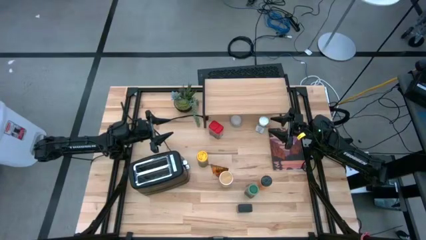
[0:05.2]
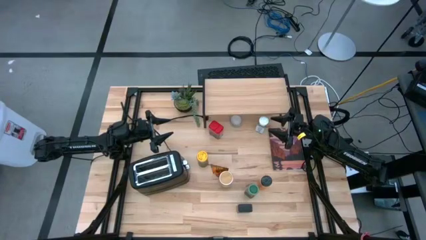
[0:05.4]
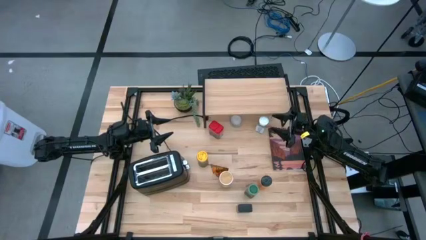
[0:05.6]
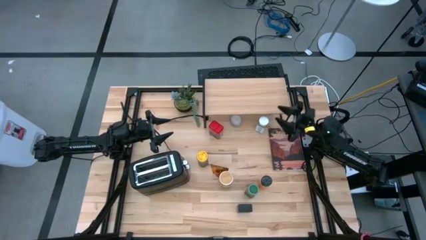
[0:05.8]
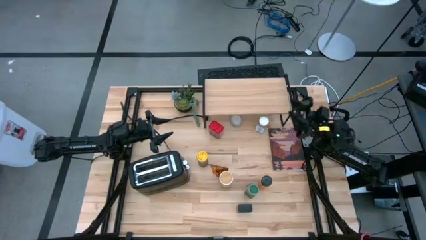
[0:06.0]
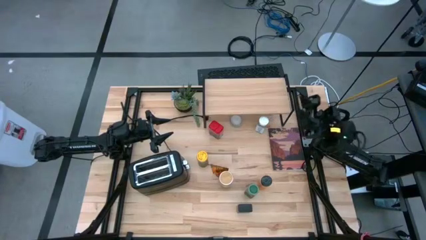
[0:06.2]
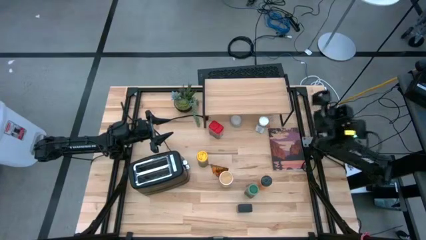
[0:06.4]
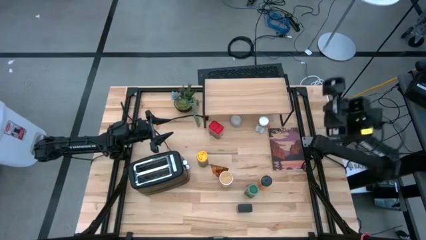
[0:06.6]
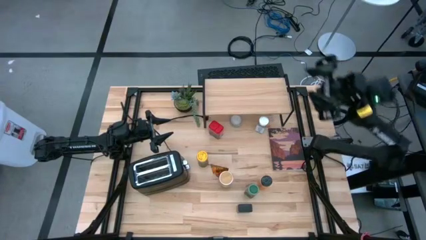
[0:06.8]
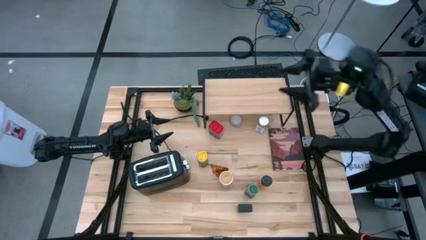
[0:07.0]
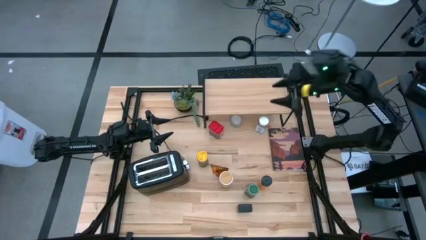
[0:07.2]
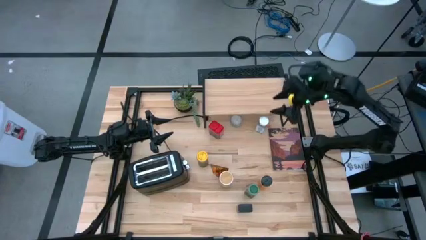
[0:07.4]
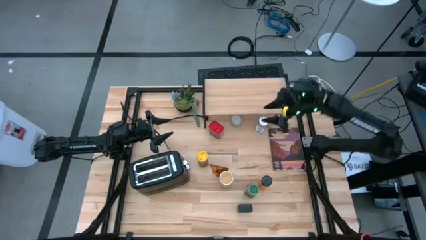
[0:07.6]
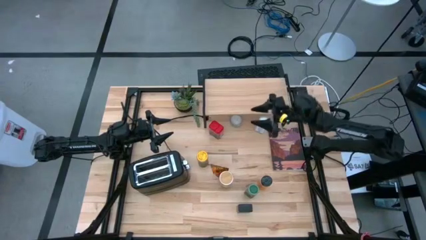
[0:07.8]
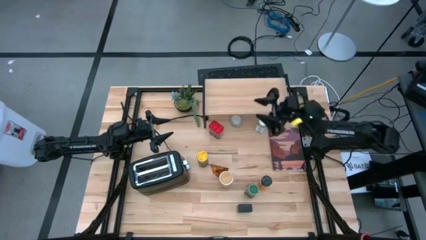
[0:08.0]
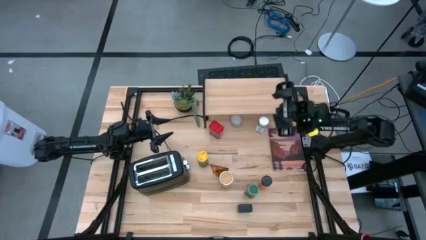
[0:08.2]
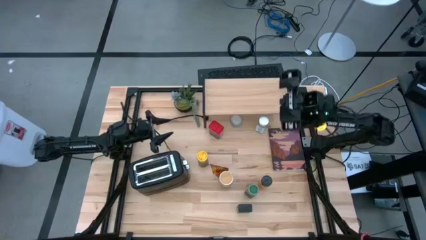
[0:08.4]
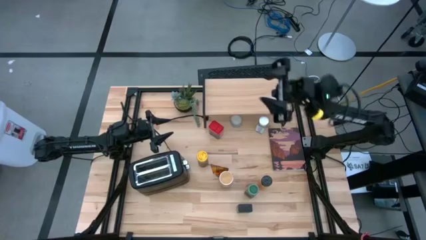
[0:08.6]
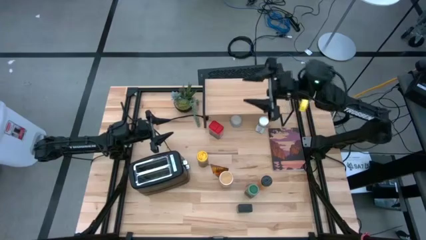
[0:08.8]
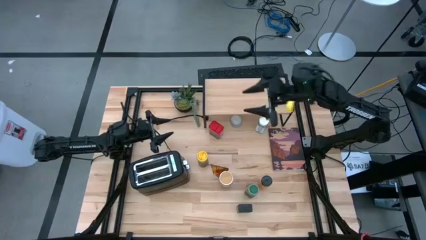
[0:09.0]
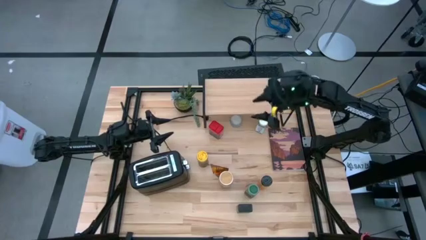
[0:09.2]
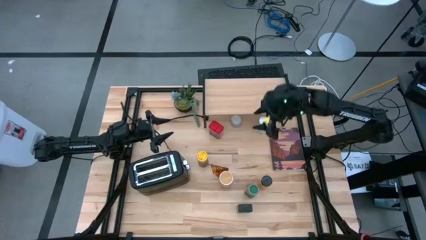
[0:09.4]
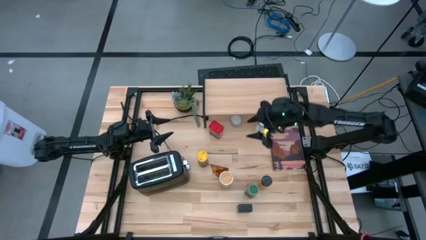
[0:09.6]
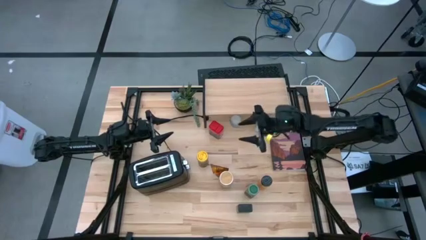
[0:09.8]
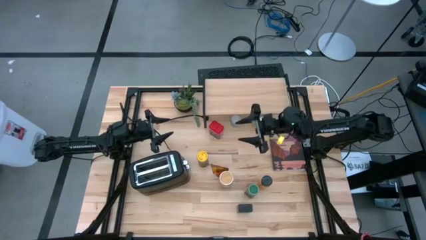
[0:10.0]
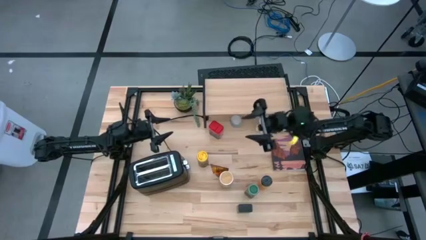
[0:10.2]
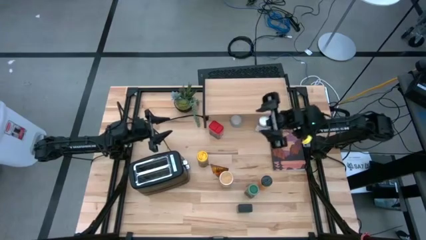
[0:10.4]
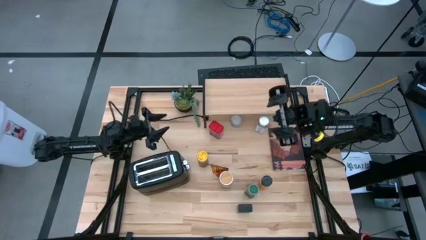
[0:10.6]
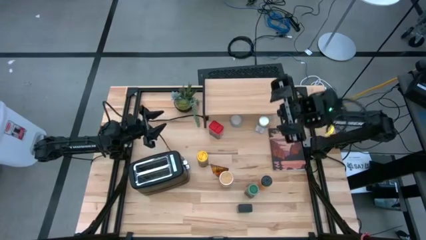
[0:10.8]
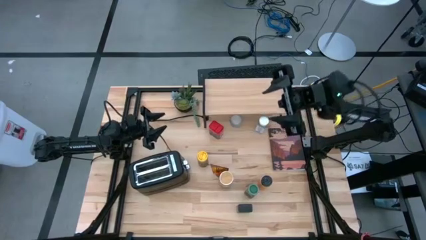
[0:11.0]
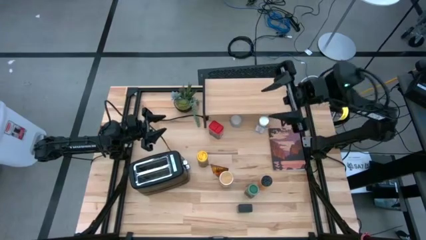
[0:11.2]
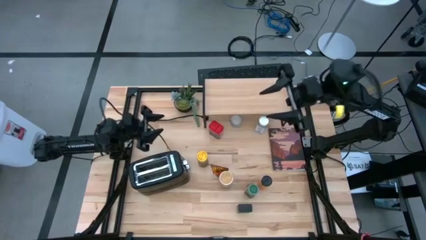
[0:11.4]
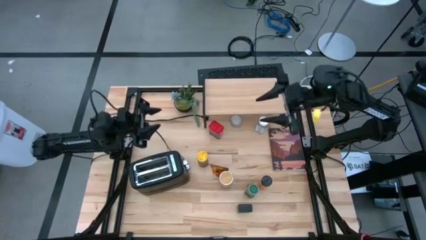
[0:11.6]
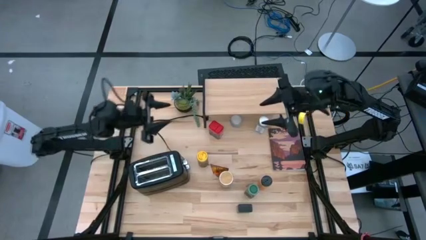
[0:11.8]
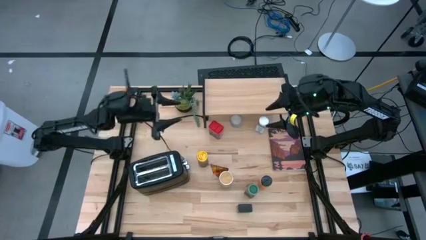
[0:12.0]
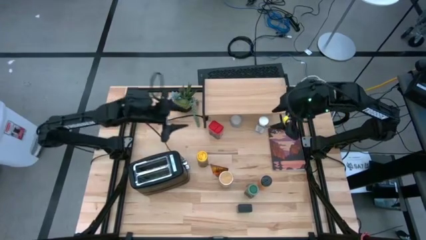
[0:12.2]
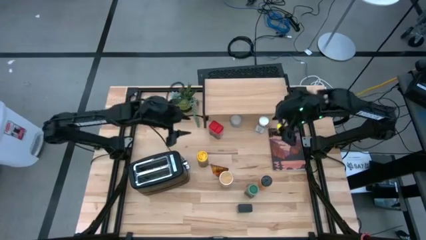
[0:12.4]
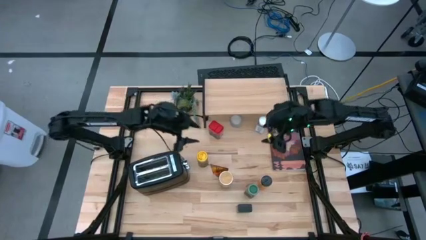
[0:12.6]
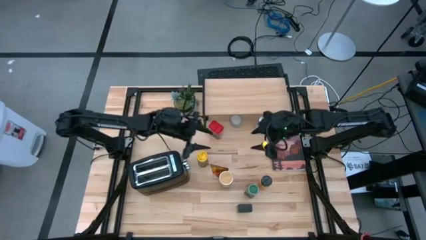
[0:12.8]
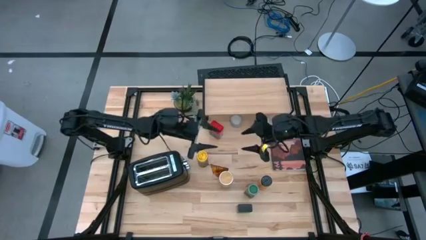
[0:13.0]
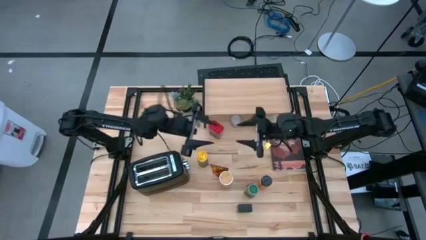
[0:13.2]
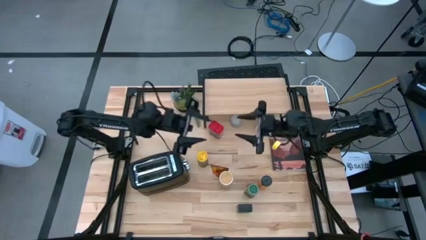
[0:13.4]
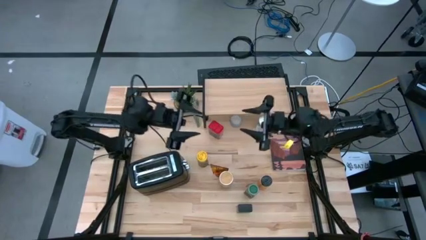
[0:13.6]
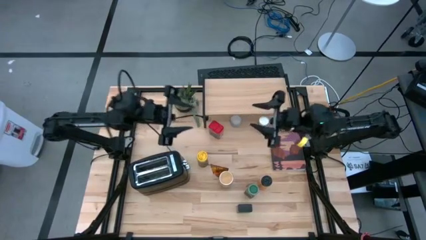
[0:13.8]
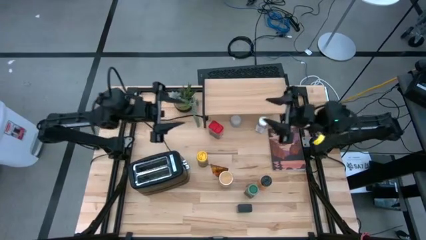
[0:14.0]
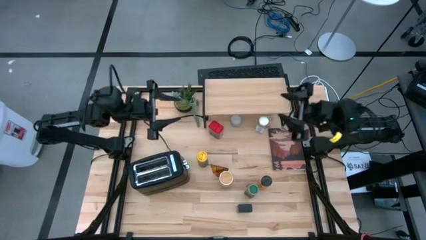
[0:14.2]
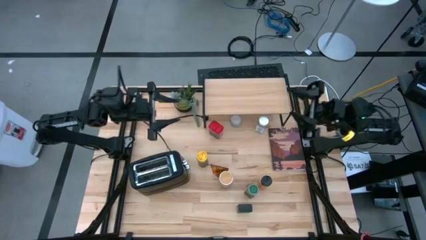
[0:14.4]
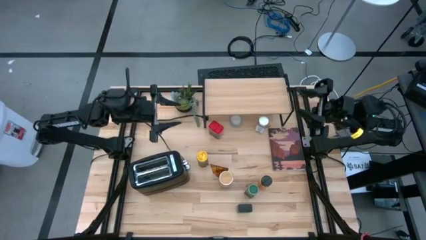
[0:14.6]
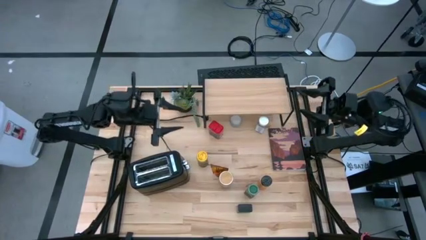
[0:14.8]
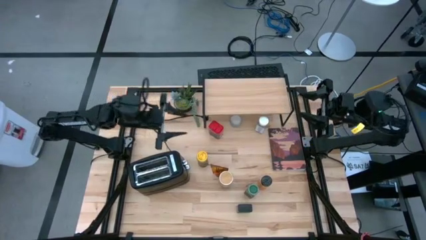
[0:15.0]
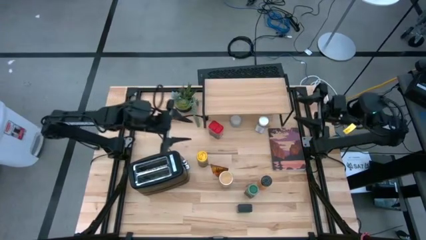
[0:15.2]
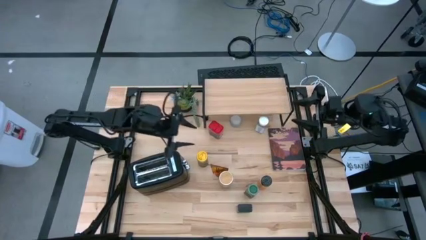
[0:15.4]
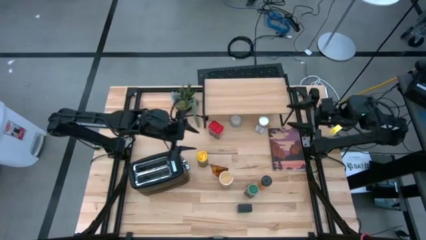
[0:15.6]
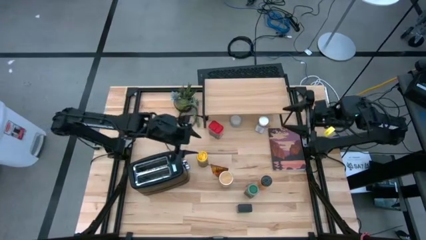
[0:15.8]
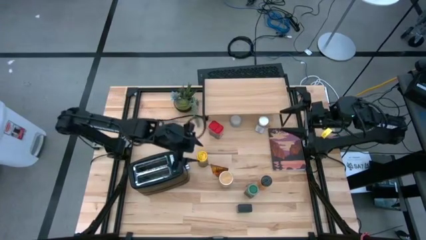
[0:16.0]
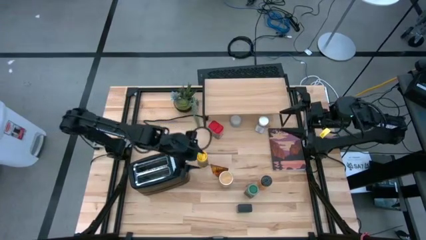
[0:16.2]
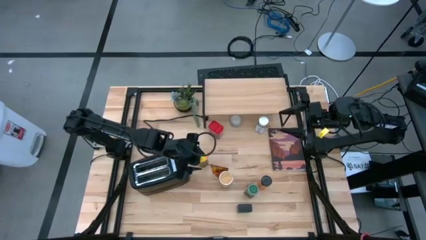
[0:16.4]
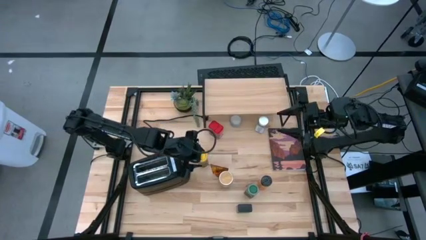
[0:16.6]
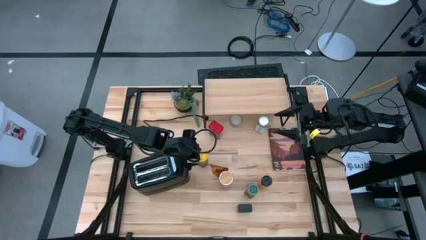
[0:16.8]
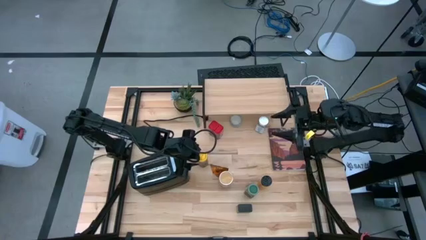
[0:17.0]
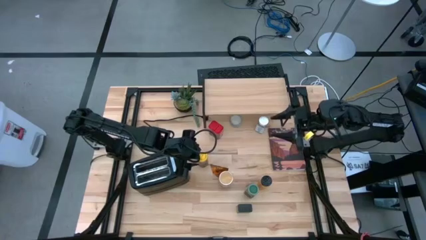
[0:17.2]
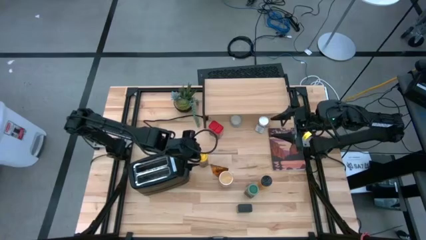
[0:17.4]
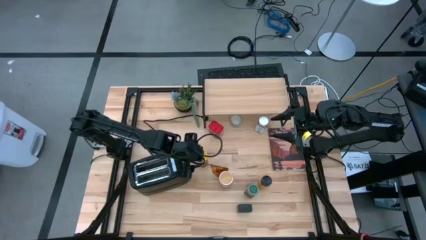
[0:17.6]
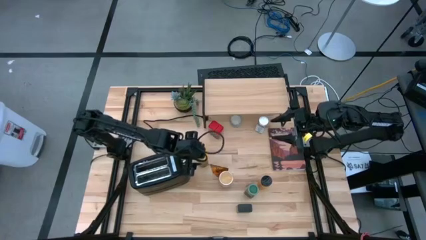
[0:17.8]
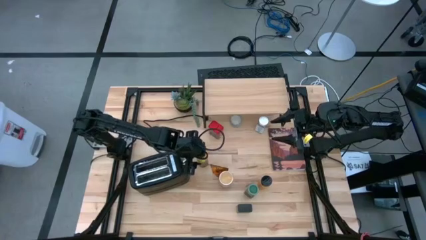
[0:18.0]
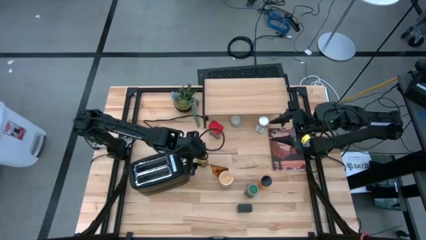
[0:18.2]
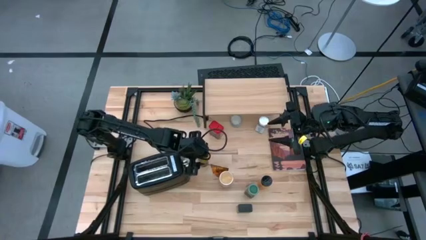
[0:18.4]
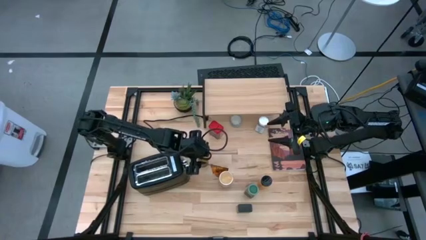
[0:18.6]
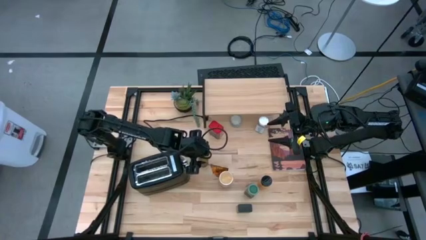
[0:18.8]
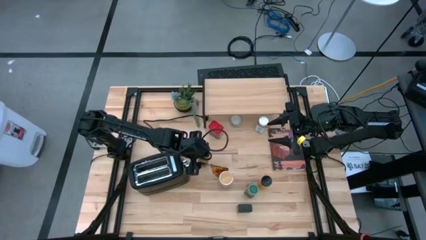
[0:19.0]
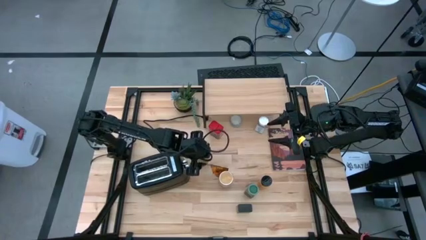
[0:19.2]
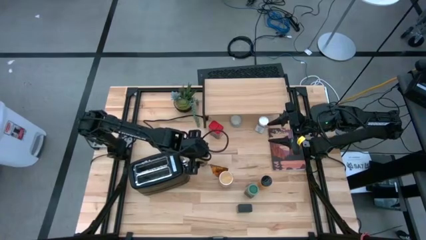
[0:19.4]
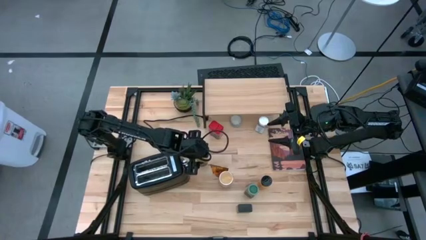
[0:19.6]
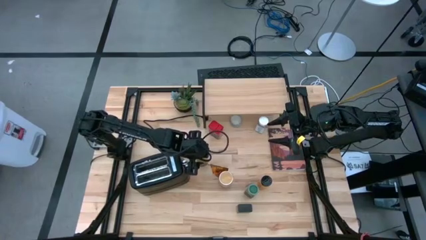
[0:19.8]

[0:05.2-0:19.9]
Task: Shelf spices
Put the yellow seasoning bottle on the shelf
